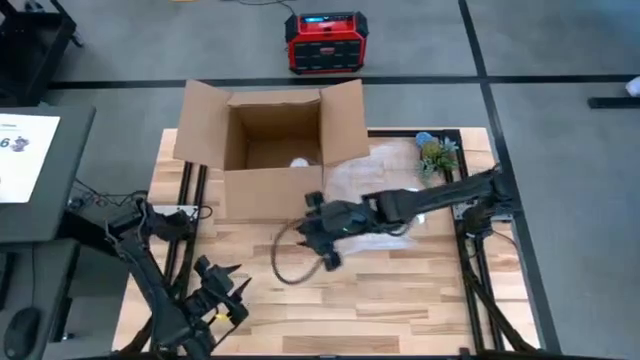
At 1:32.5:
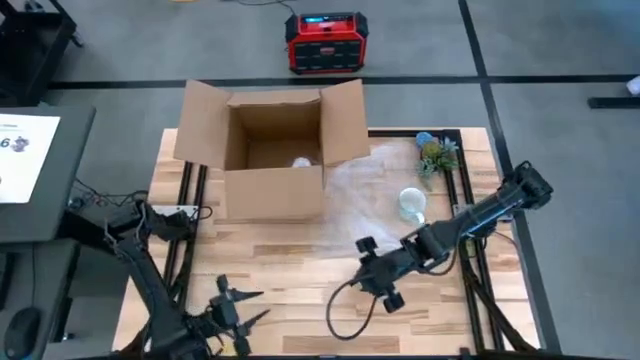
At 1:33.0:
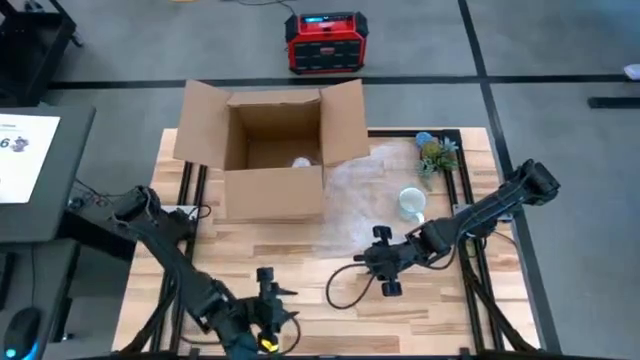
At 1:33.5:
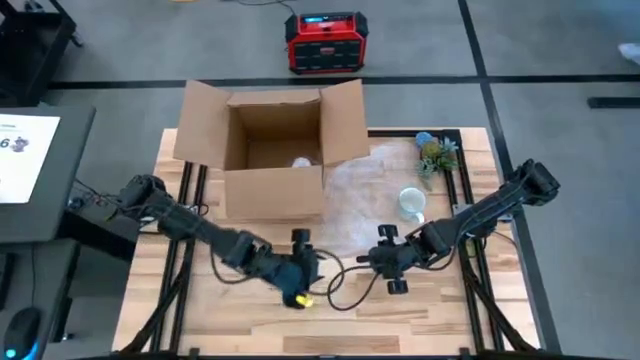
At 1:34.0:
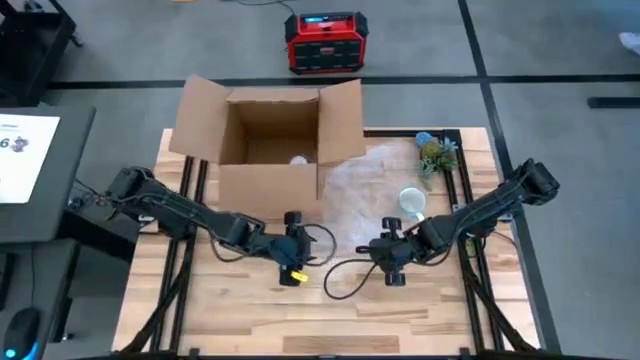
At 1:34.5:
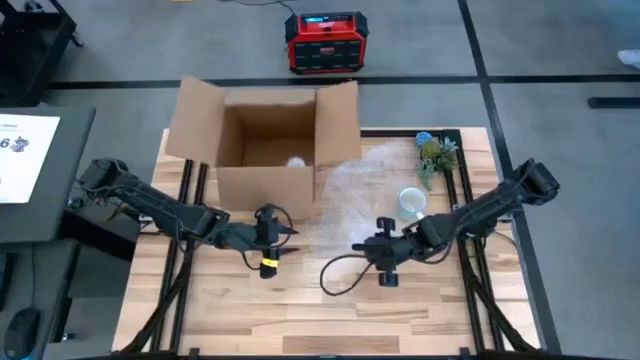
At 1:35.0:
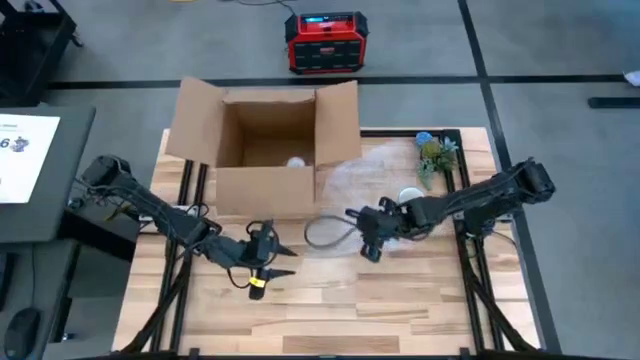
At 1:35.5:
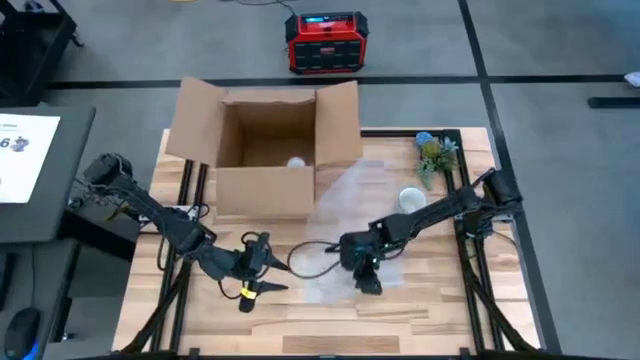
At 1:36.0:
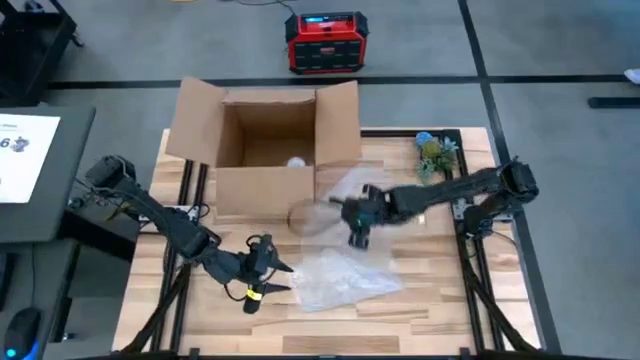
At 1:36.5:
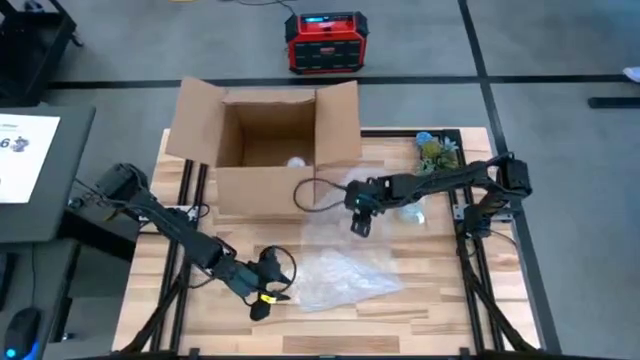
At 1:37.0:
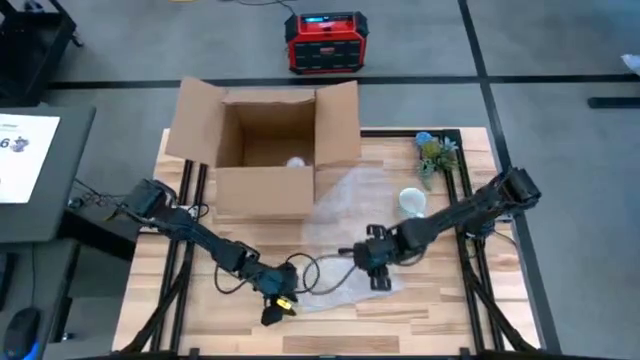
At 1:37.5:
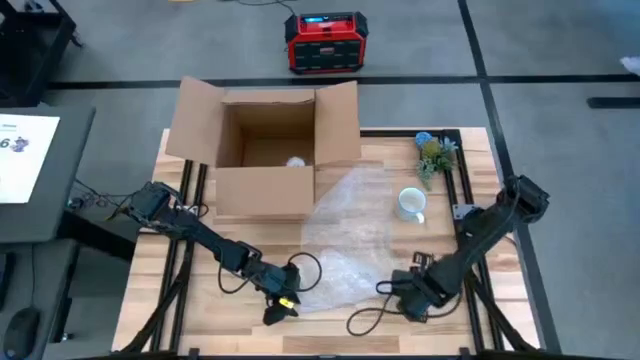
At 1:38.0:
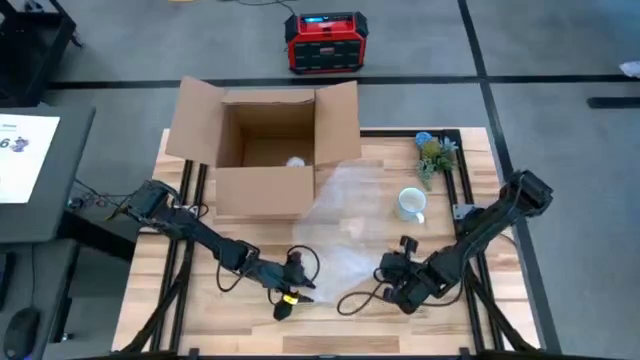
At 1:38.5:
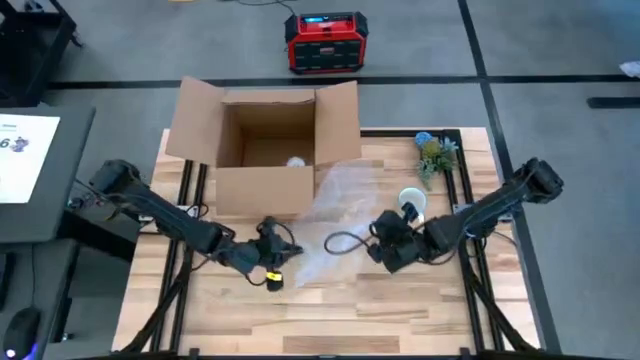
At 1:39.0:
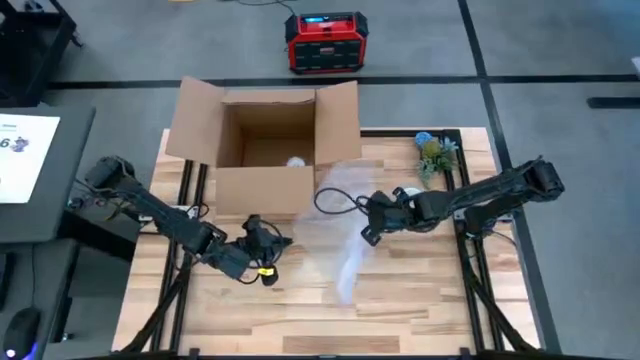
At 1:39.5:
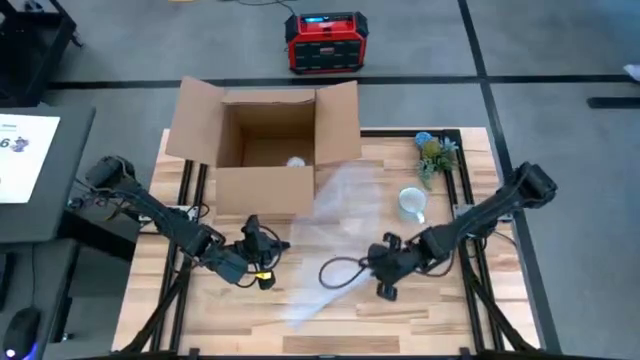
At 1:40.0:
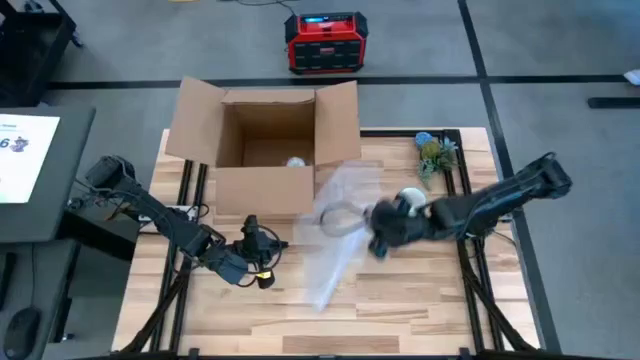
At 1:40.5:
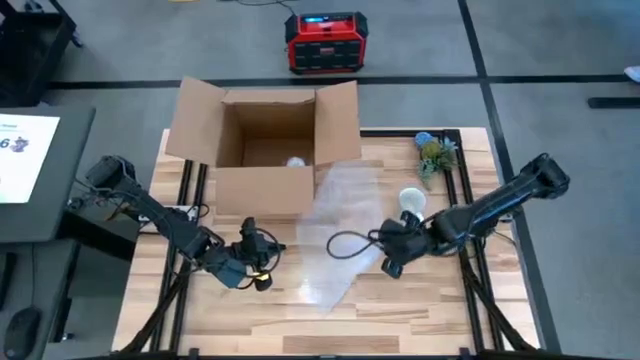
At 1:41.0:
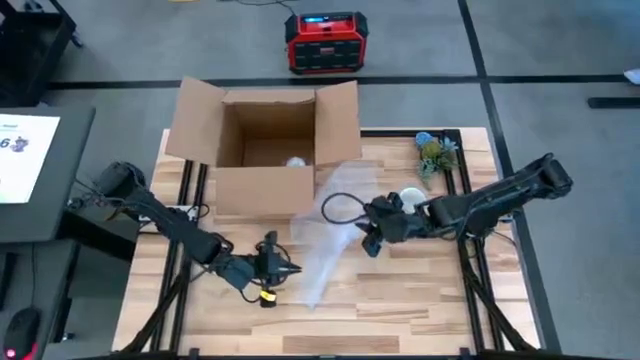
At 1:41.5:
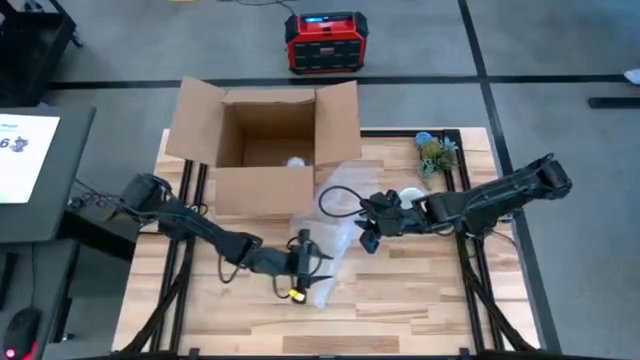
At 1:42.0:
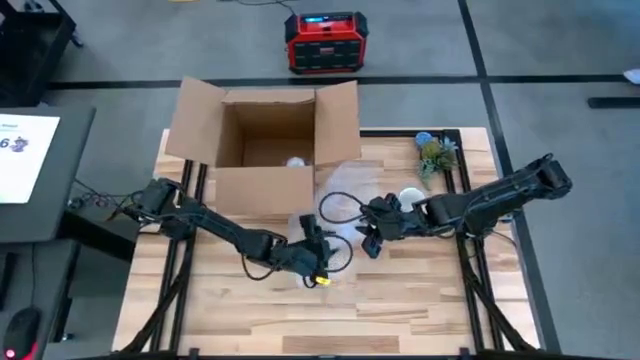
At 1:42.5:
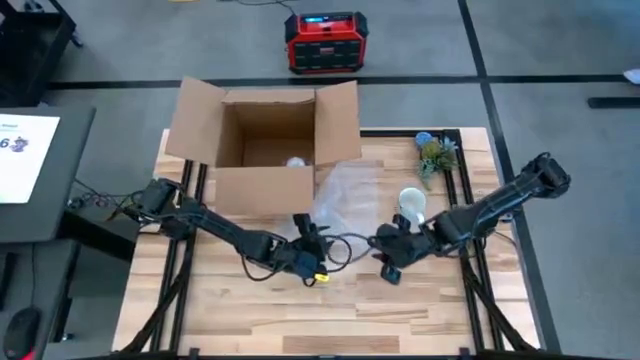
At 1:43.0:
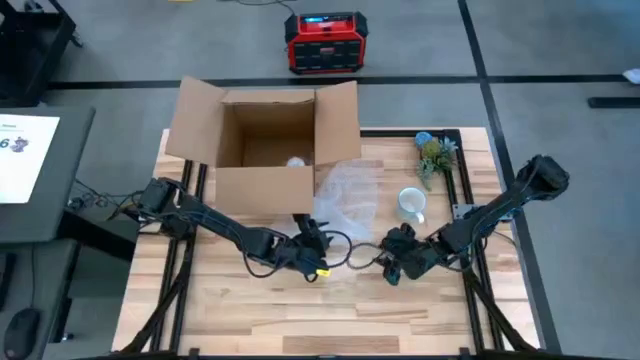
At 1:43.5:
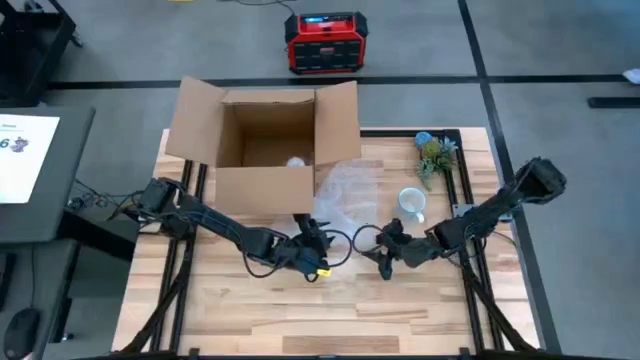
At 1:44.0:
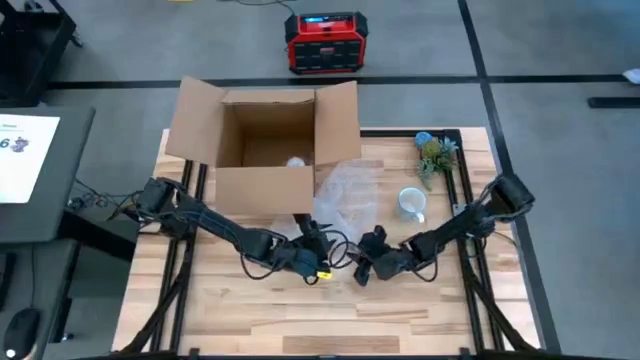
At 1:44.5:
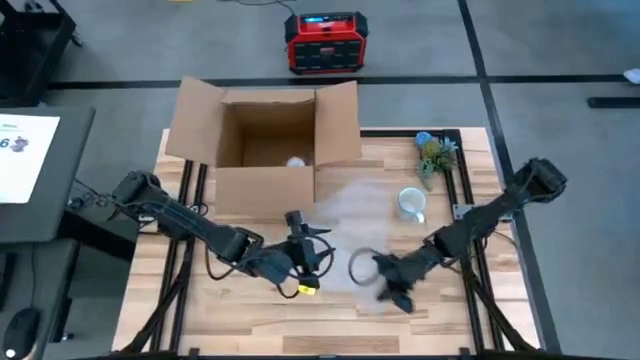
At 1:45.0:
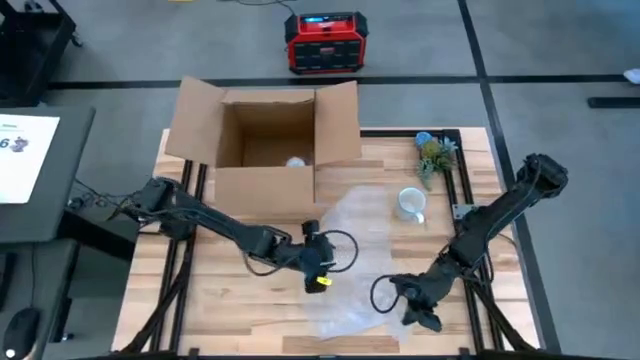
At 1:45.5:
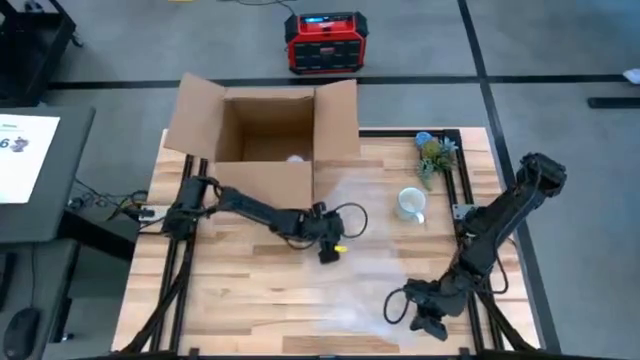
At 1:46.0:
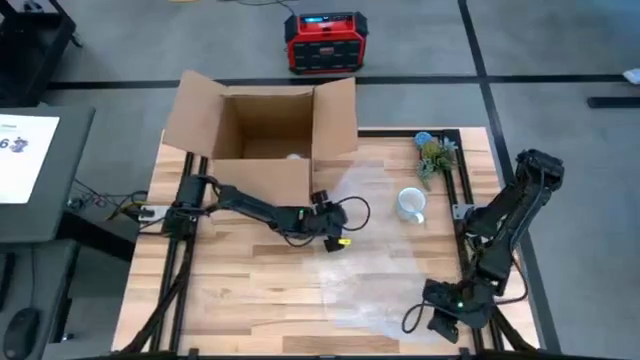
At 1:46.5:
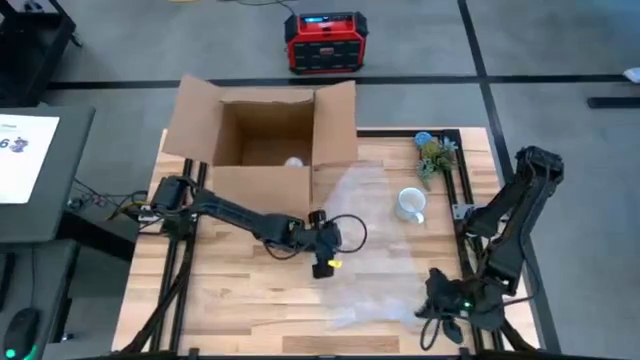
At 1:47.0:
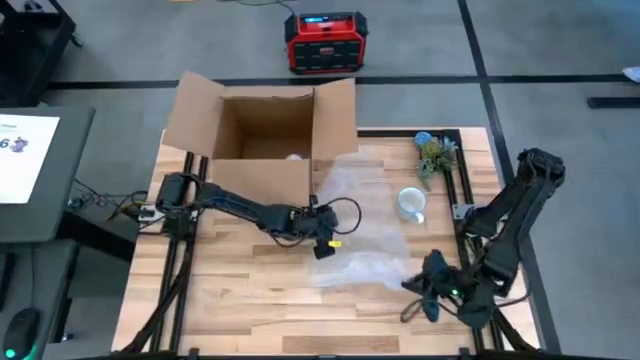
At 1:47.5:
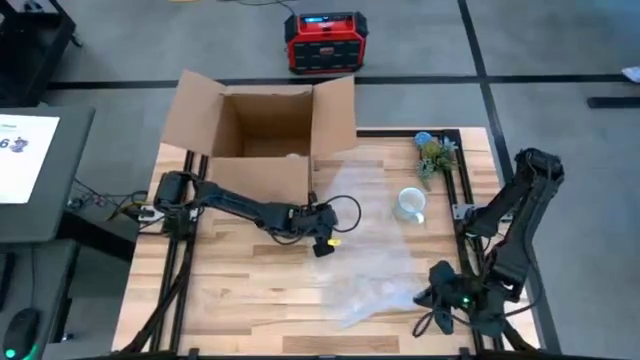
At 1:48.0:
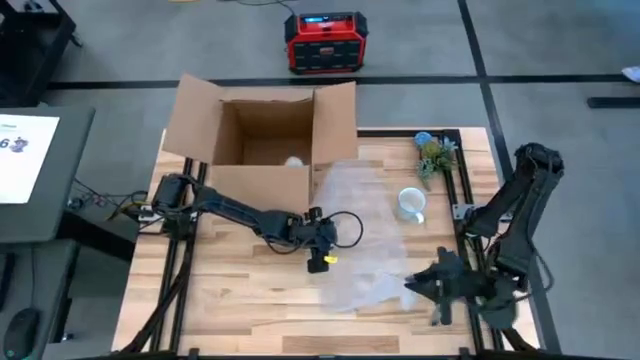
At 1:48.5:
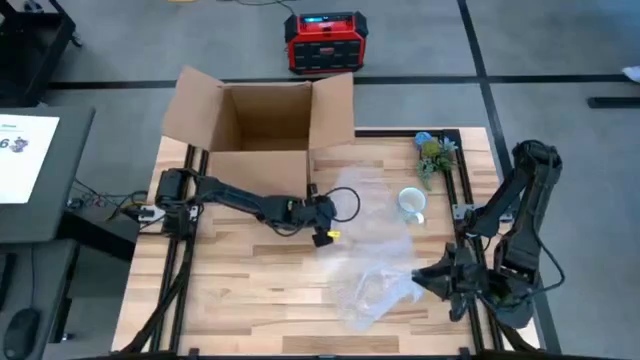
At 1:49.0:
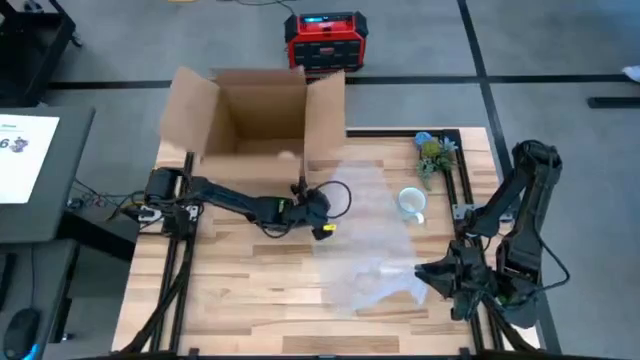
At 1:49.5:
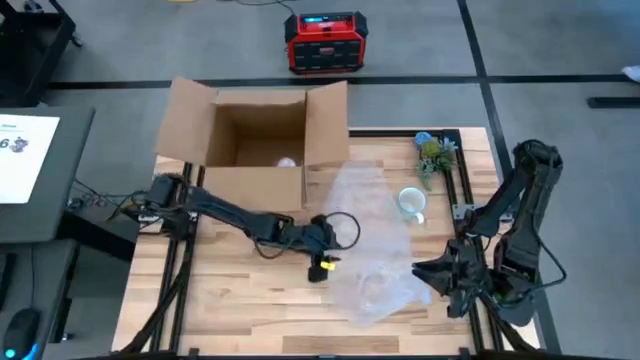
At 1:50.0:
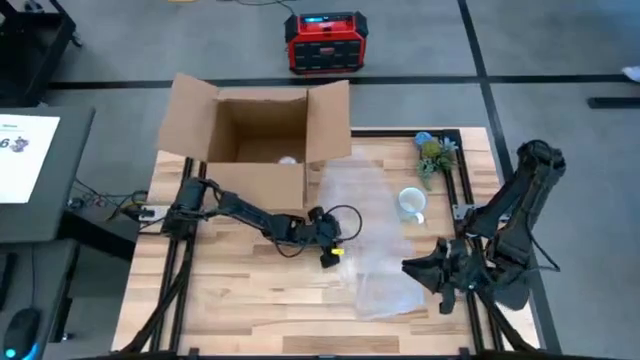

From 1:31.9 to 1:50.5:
Task: wrap mug
Wrap the green mug with bubble wrap

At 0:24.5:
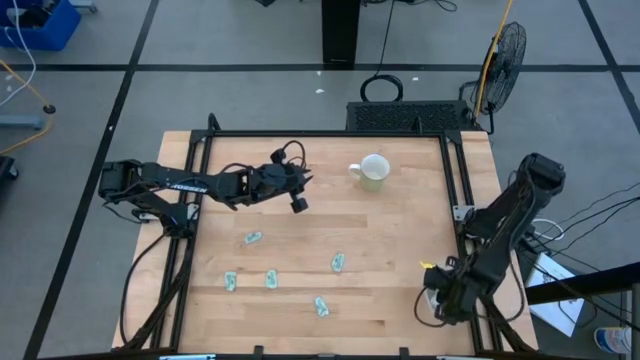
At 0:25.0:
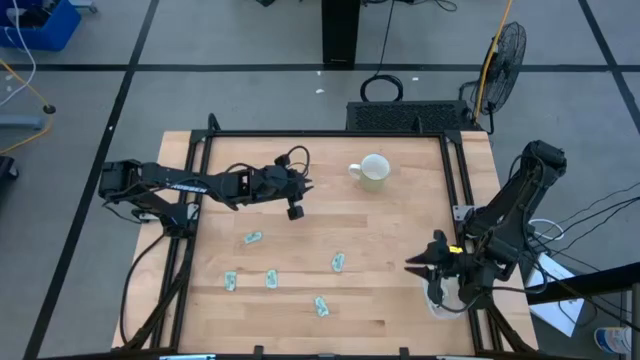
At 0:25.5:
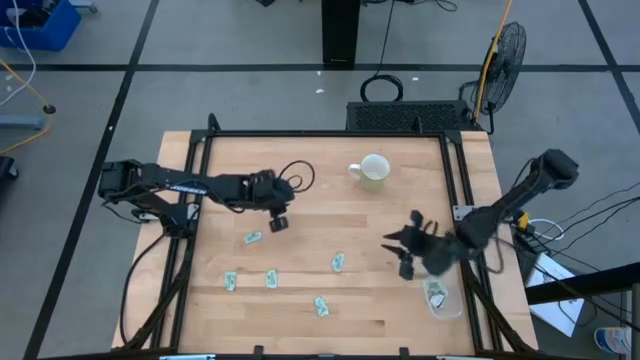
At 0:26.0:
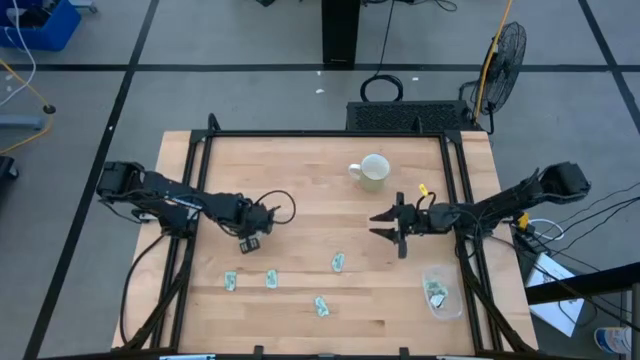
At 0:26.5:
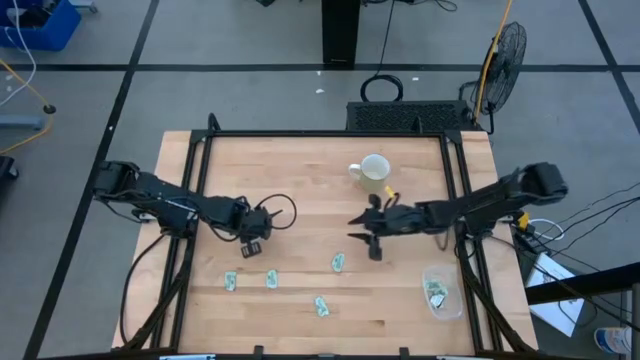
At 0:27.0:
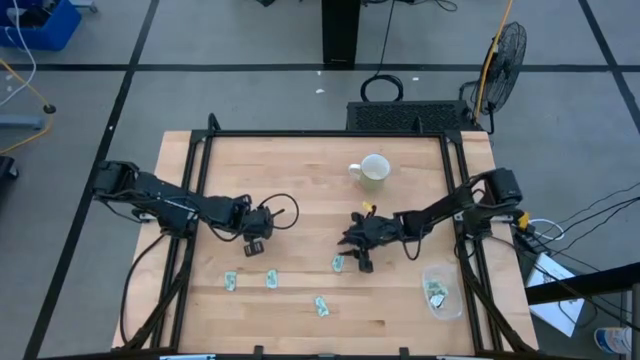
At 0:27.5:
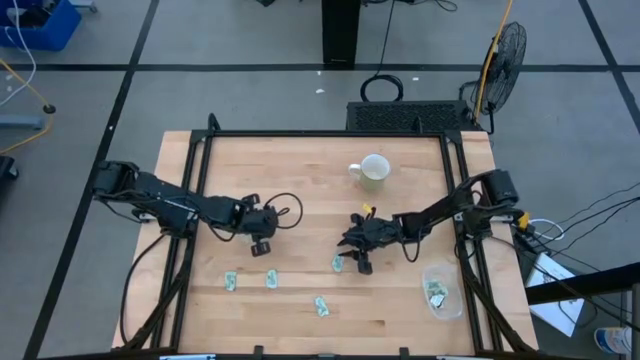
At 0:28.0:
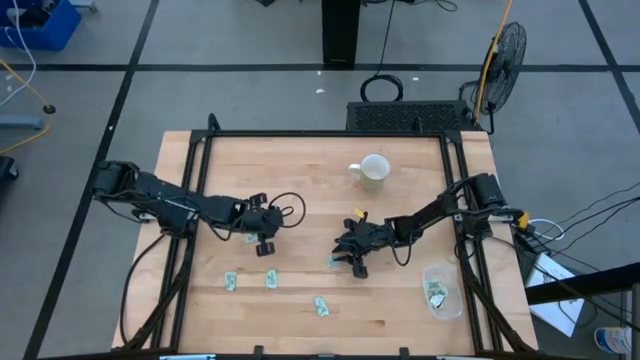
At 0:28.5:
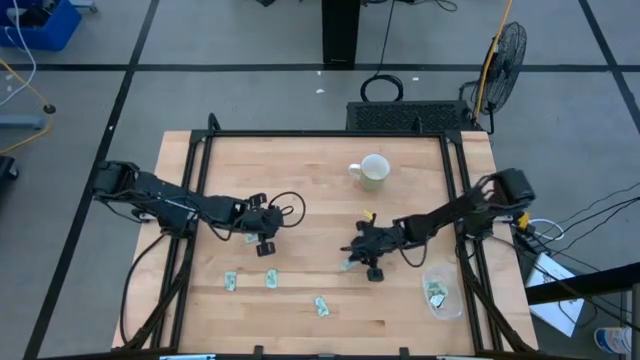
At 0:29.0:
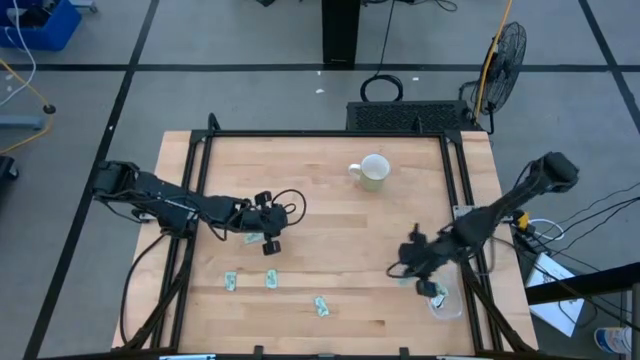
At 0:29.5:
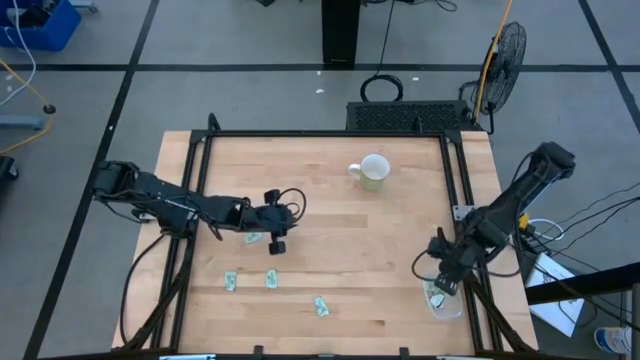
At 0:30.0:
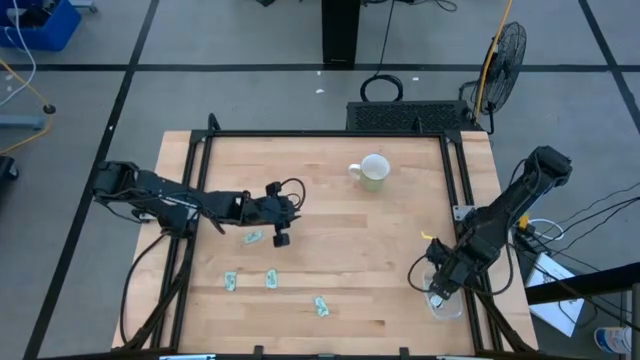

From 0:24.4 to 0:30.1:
Task: Pick and place Stevia / Truvia into bins
Put the stevia packet into the transparent bin
